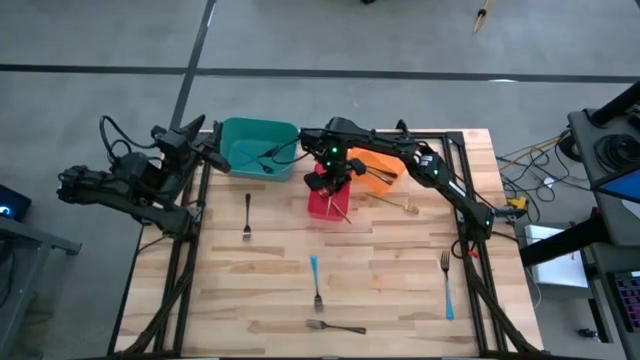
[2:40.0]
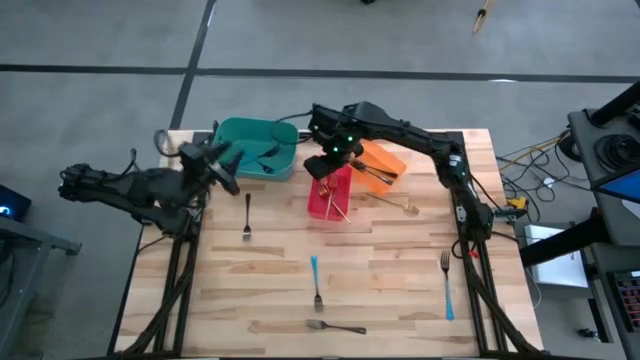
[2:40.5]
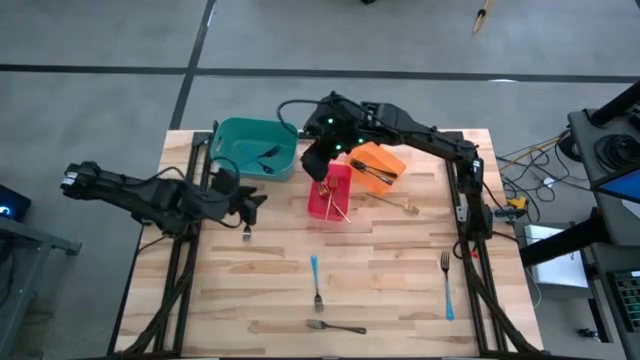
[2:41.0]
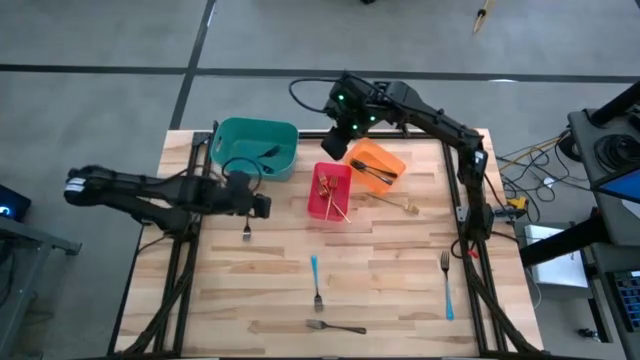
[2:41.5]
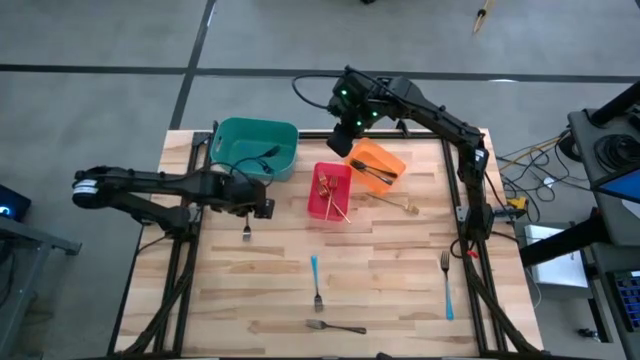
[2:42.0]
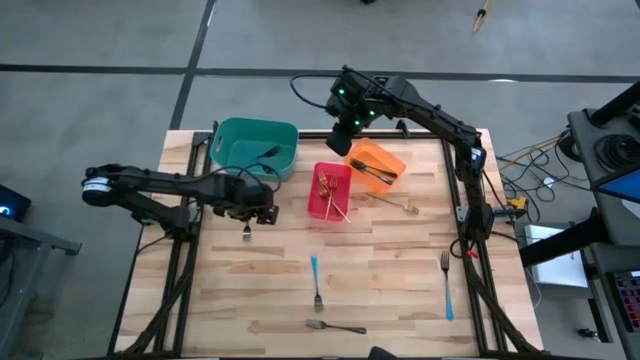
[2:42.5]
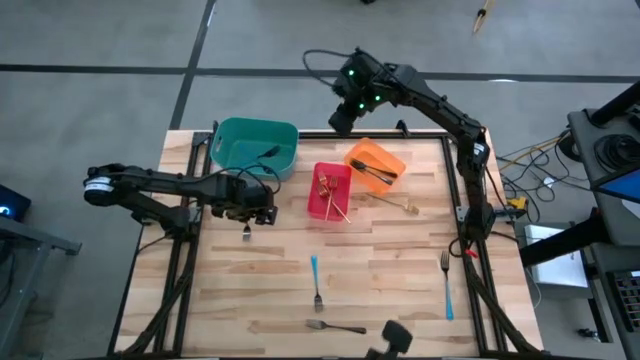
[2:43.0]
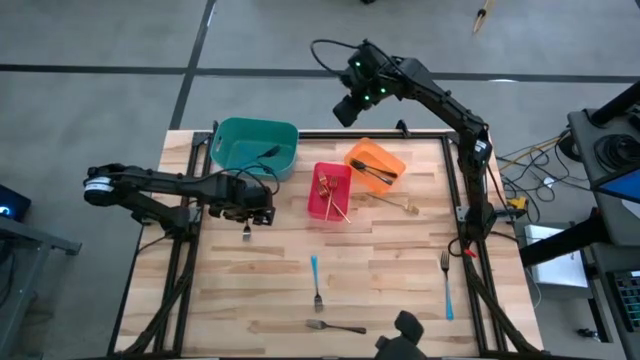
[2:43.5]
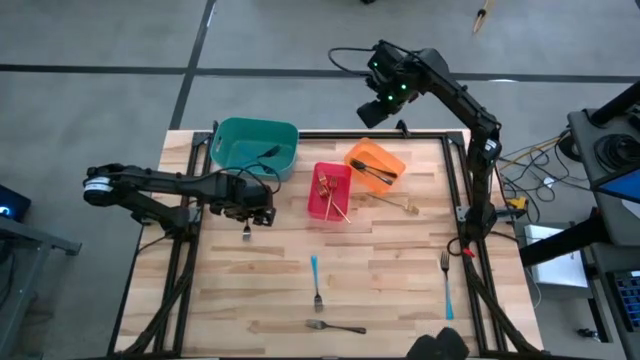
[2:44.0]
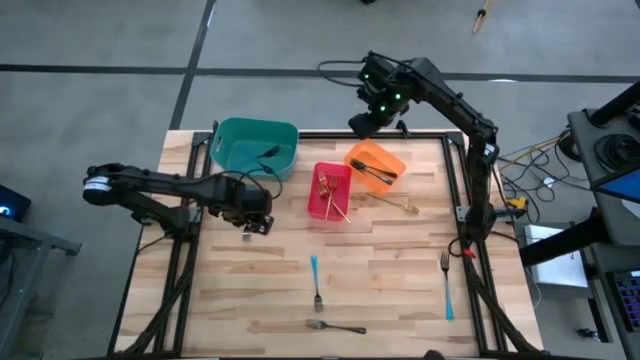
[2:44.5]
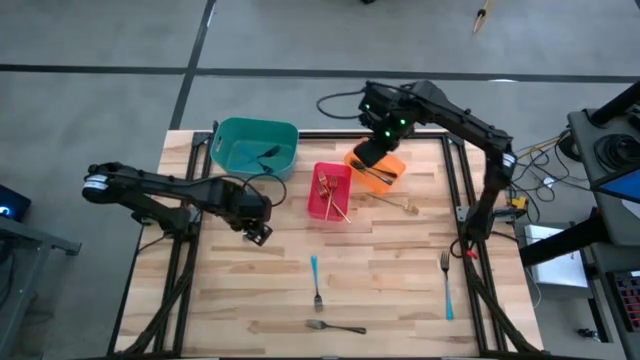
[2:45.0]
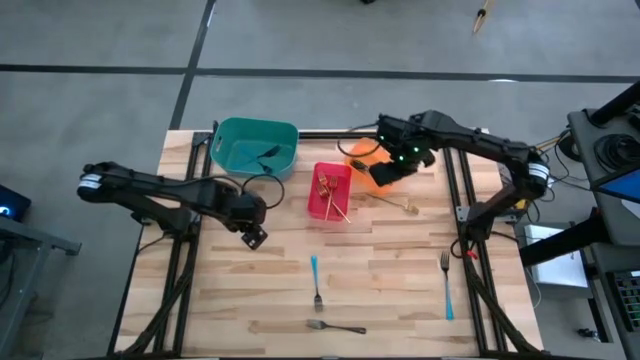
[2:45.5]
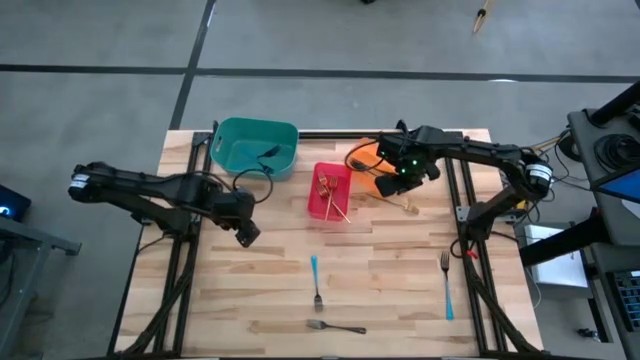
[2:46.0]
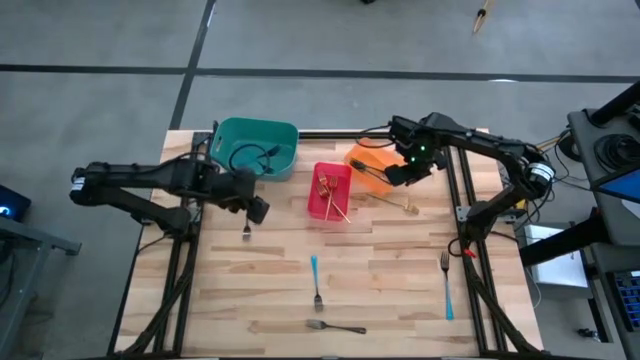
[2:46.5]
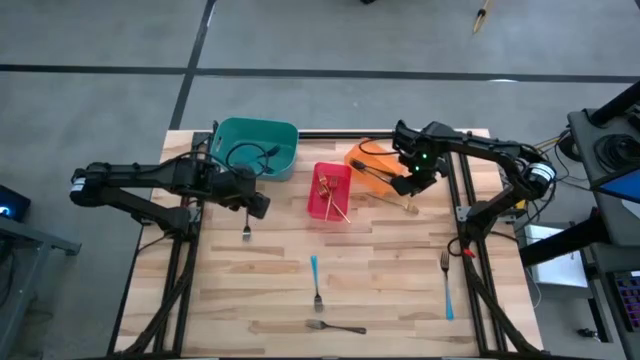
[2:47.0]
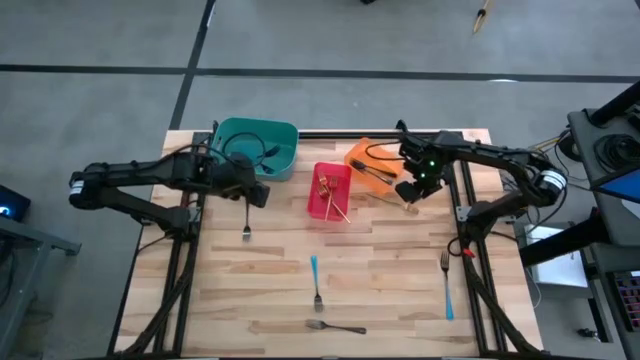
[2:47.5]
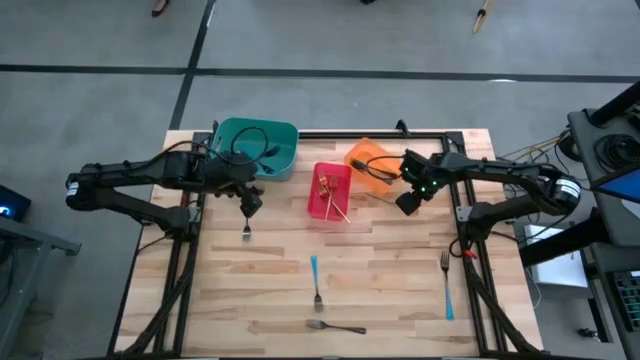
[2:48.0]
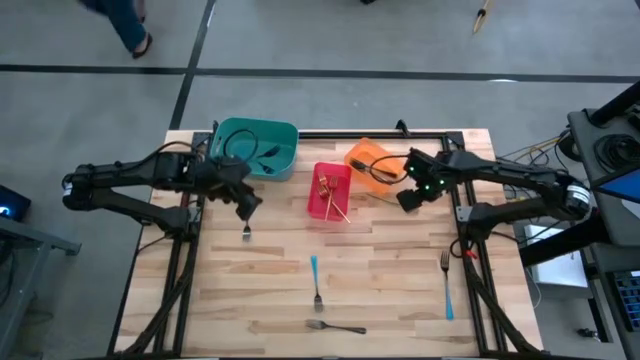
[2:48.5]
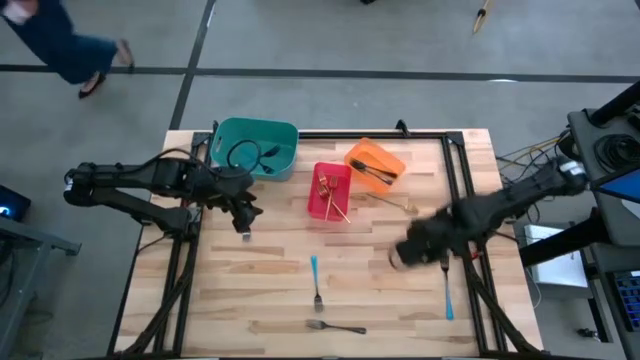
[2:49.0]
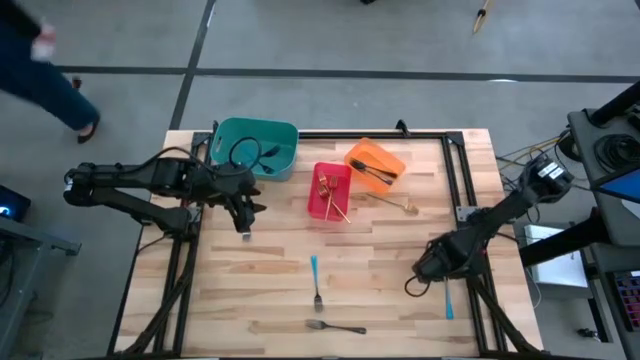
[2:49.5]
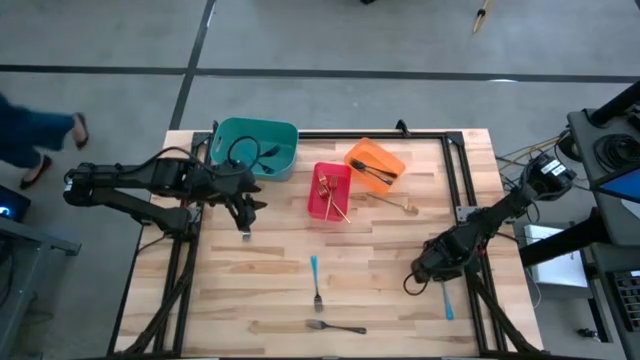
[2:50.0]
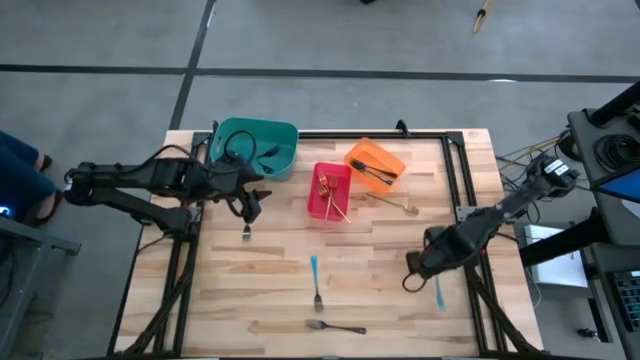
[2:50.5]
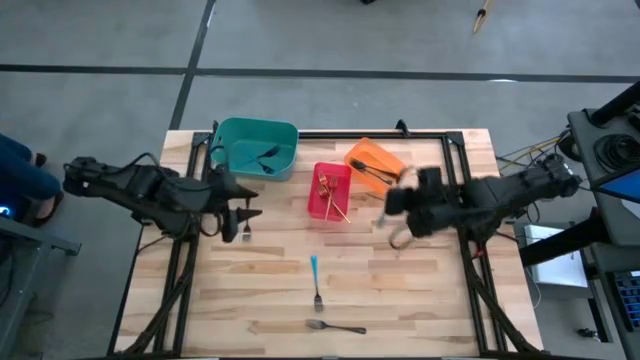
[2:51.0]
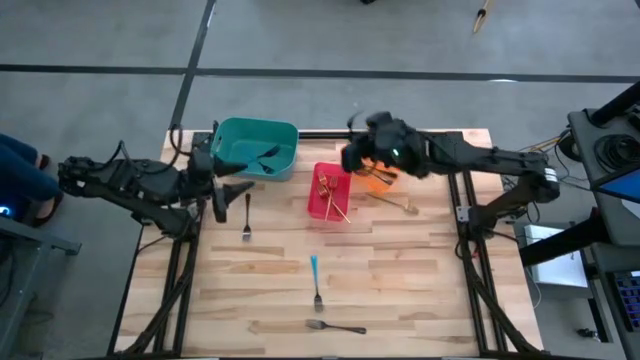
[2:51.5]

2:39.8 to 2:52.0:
Task: Sort silverware by color (type)
Put the blue fork into the green bin

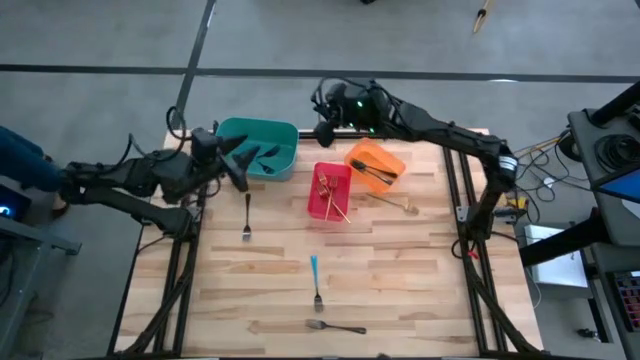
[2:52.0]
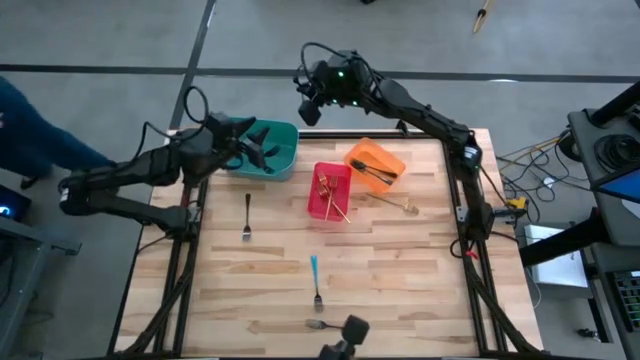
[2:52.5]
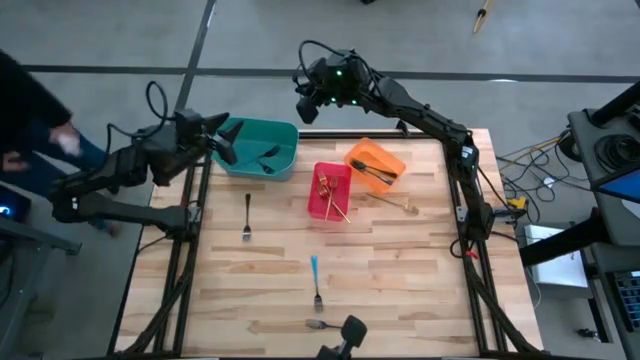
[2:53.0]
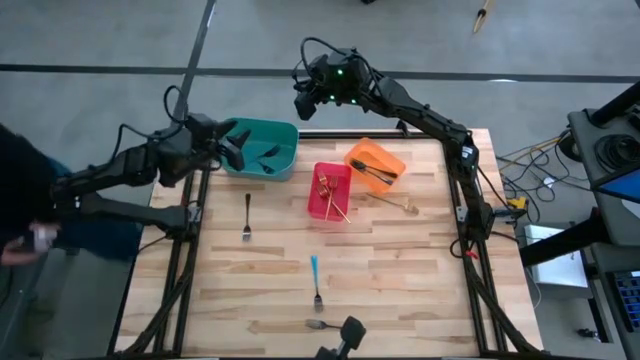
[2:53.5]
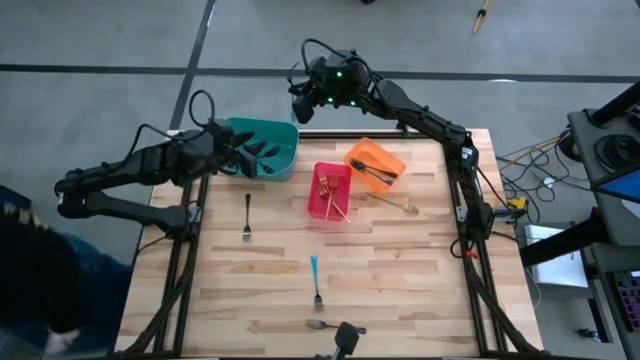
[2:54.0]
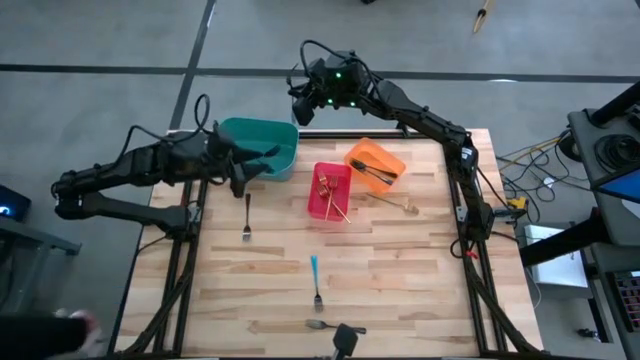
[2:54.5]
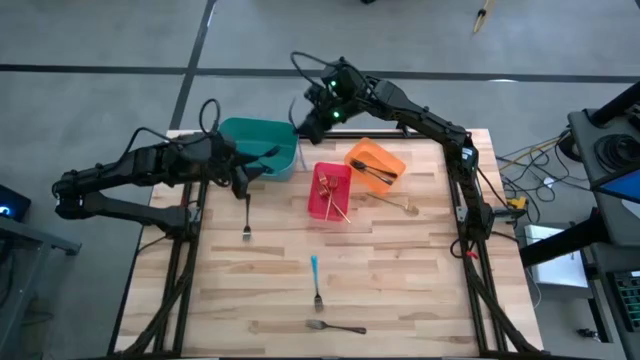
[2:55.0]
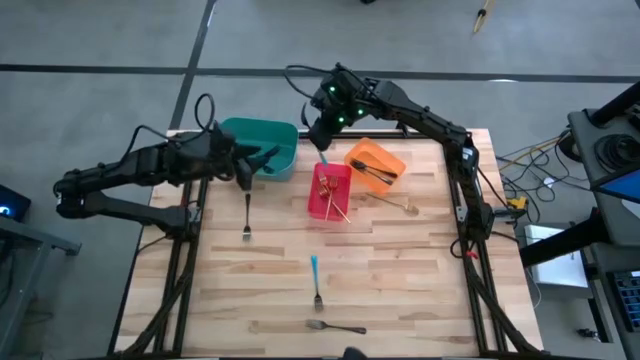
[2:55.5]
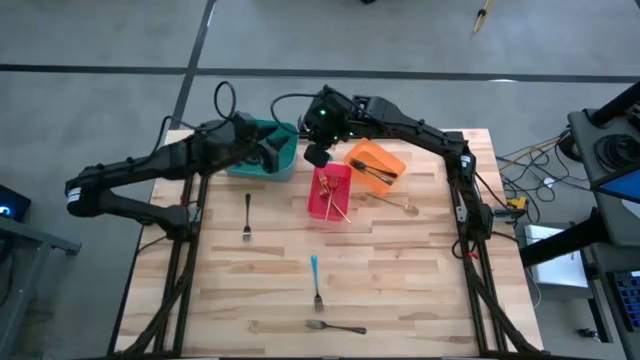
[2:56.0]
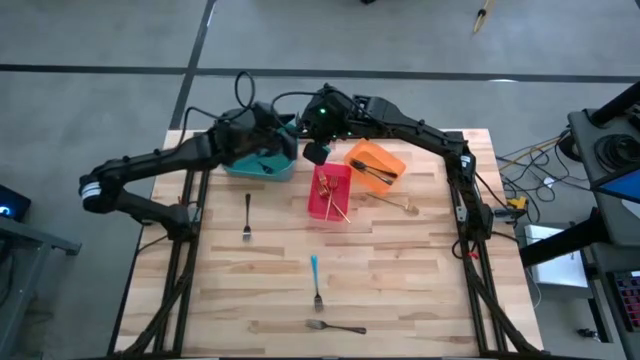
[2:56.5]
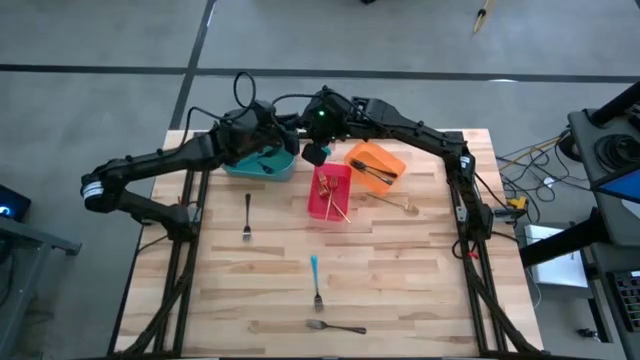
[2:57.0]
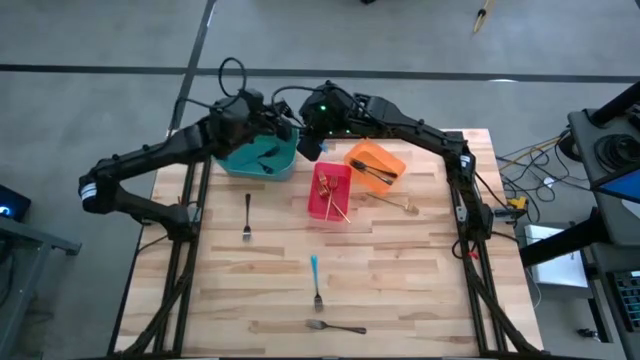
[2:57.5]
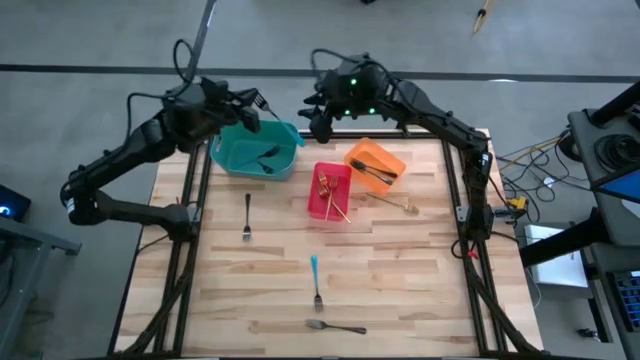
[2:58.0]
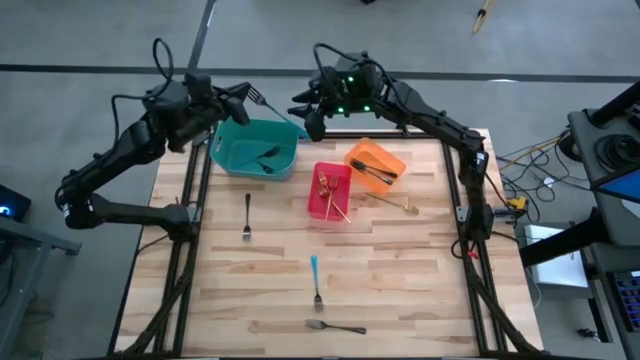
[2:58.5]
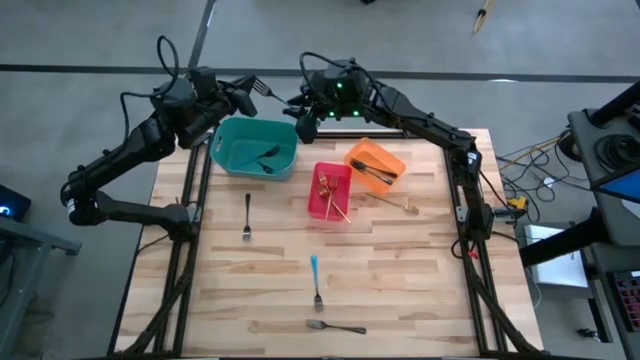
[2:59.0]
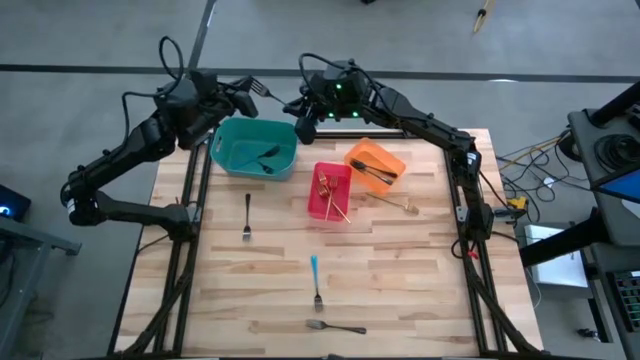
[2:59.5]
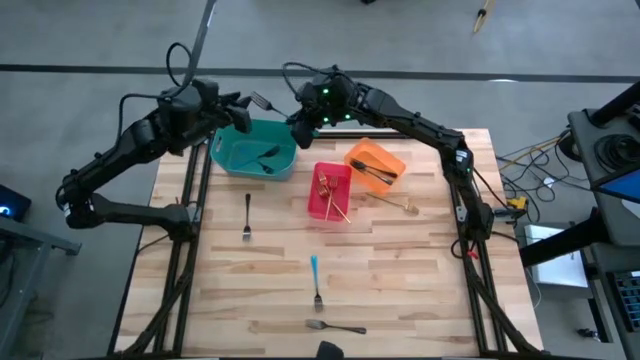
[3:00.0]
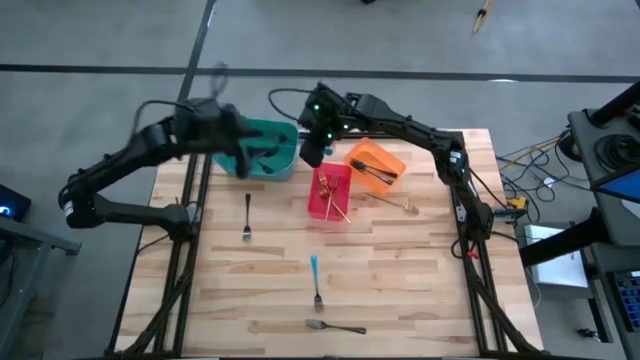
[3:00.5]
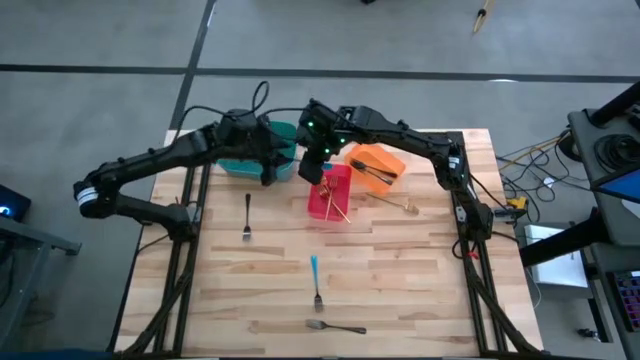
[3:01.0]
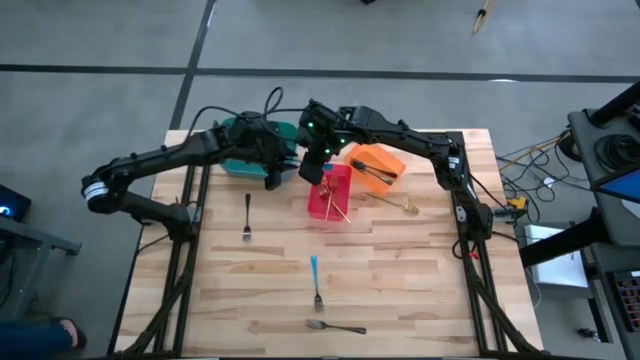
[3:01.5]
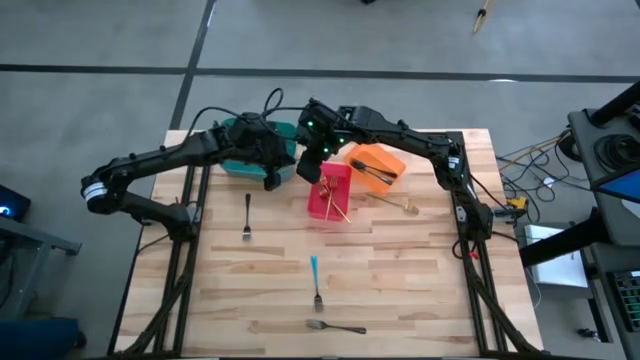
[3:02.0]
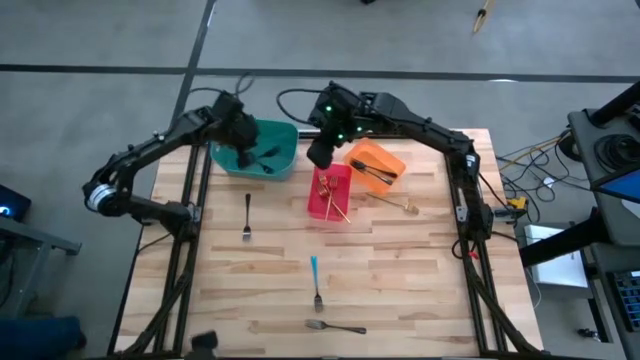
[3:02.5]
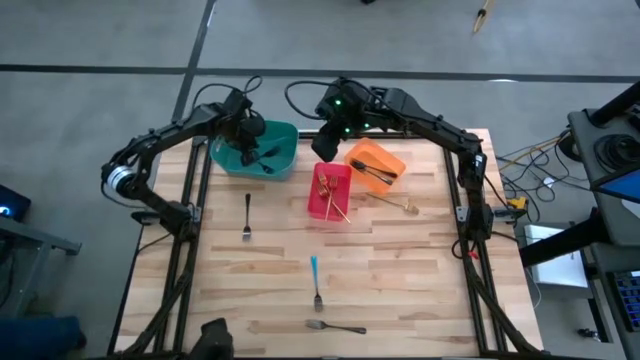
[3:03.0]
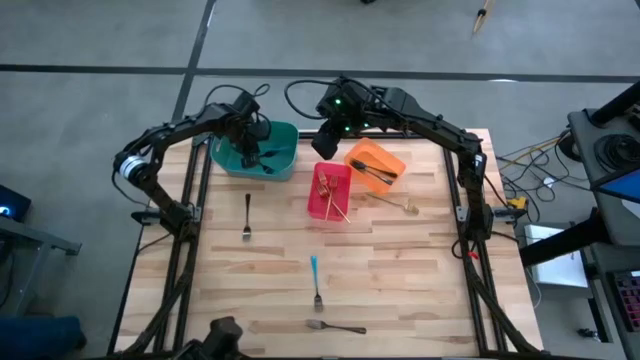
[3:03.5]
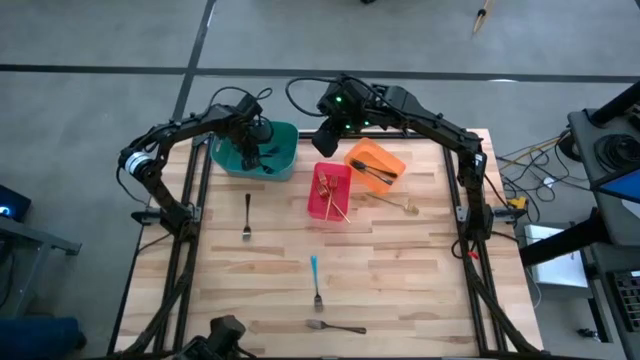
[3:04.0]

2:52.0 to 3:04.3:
Put the blue fork into the green bin
